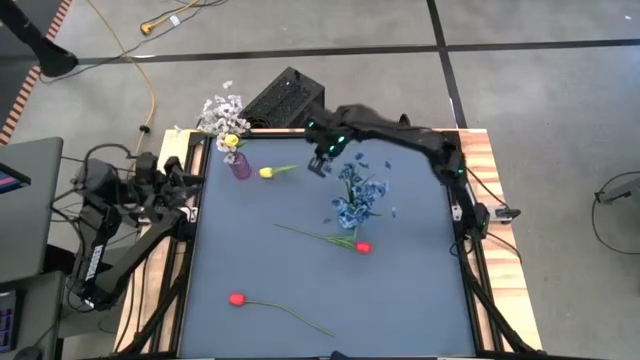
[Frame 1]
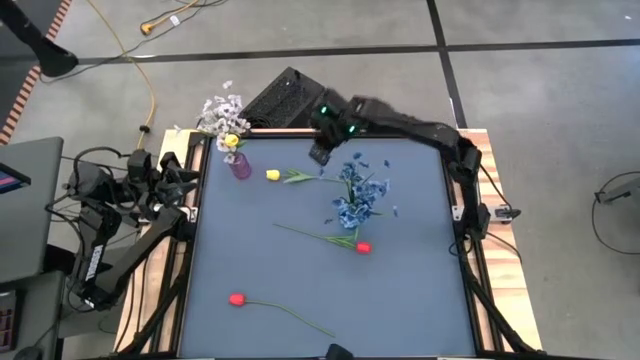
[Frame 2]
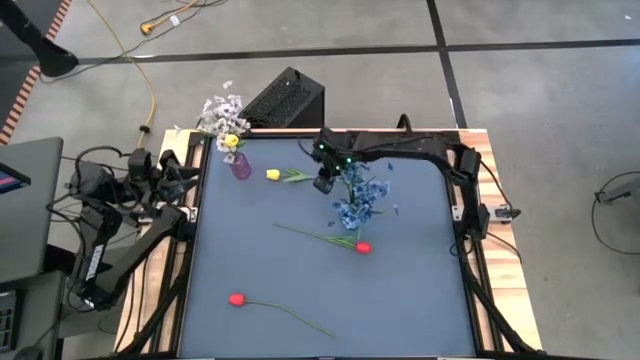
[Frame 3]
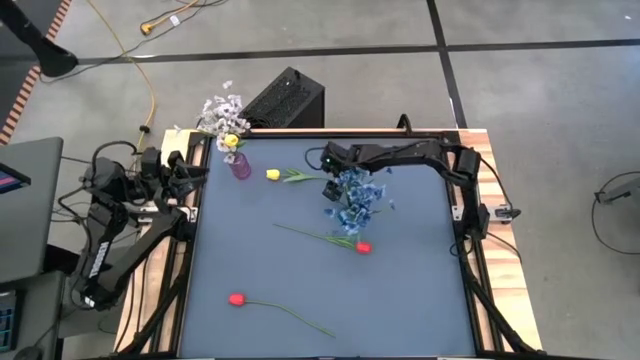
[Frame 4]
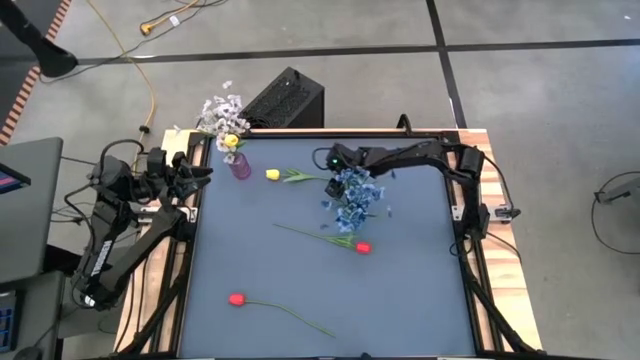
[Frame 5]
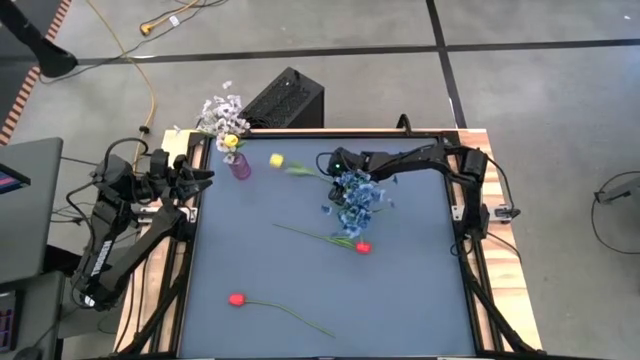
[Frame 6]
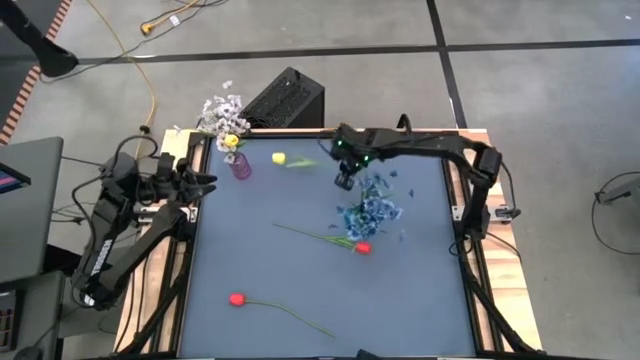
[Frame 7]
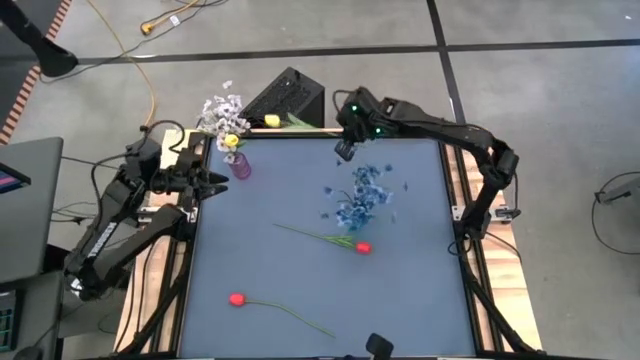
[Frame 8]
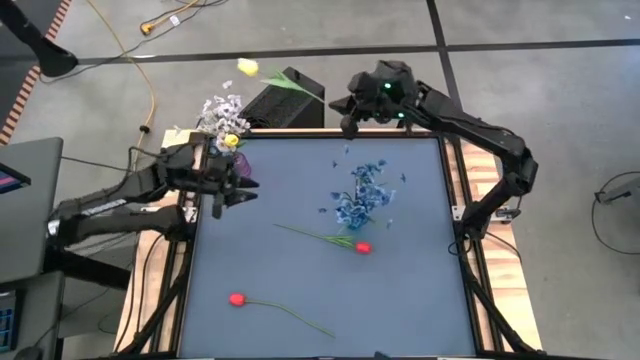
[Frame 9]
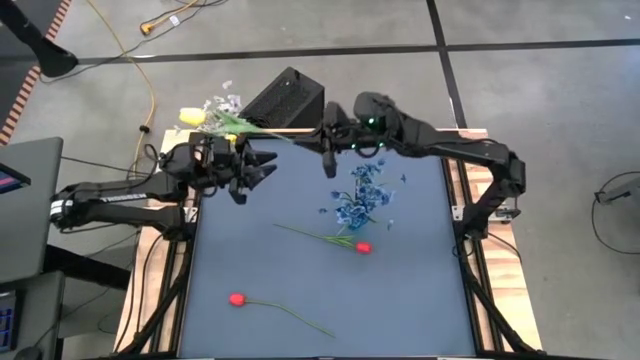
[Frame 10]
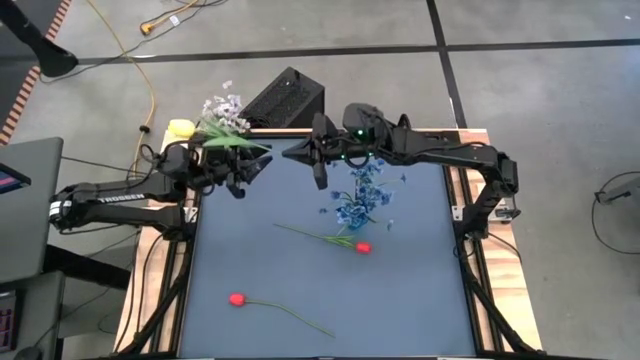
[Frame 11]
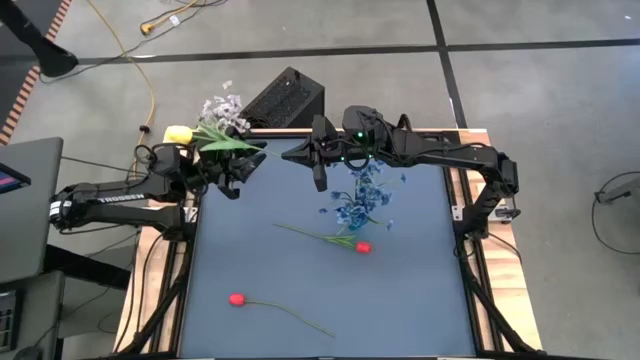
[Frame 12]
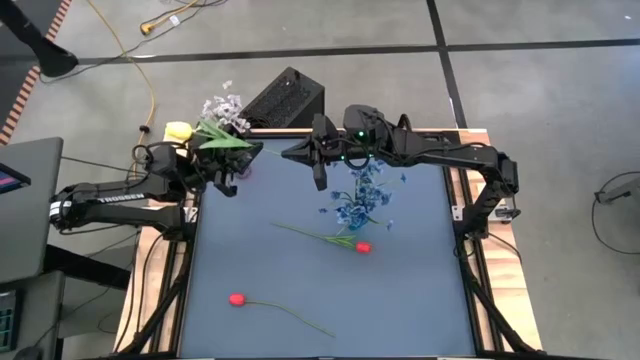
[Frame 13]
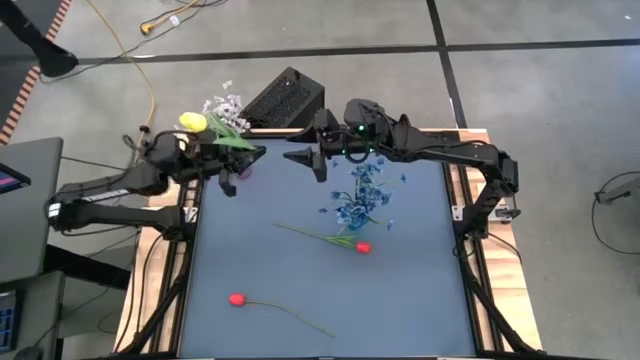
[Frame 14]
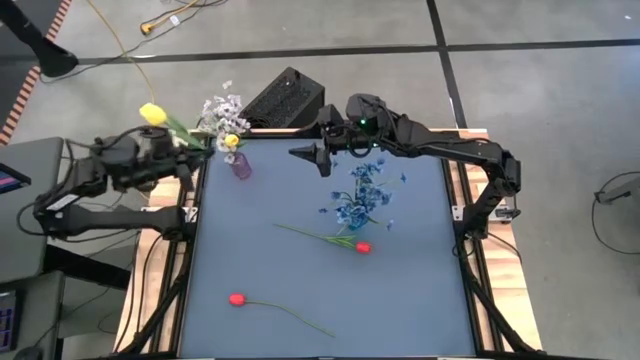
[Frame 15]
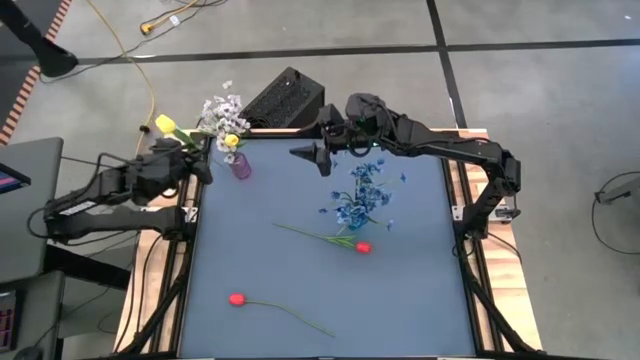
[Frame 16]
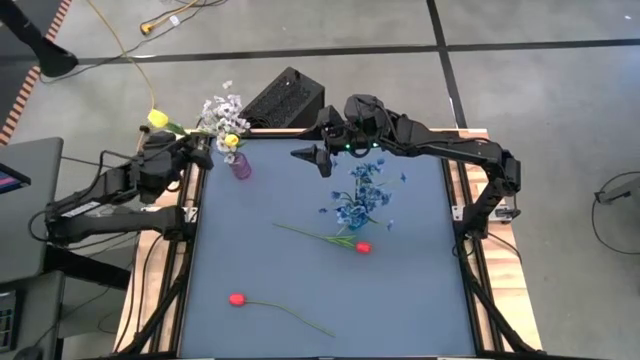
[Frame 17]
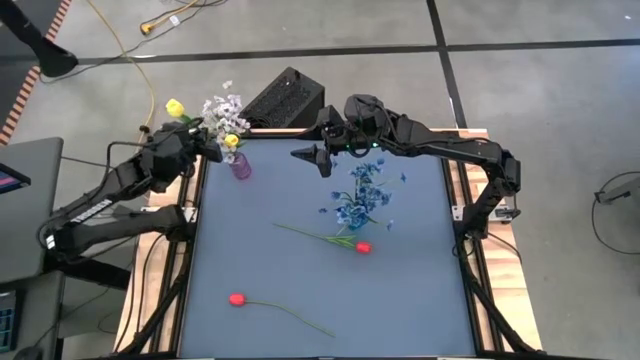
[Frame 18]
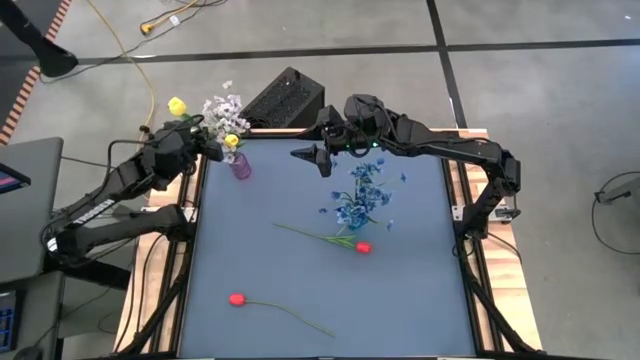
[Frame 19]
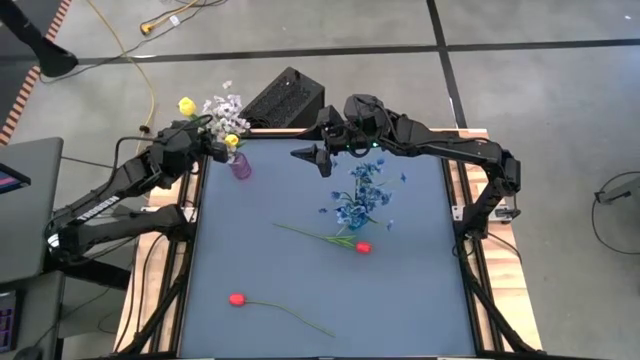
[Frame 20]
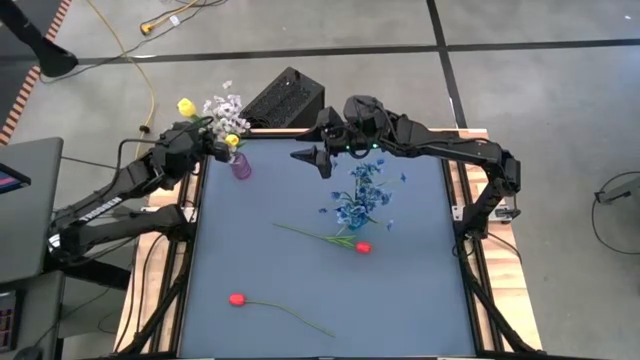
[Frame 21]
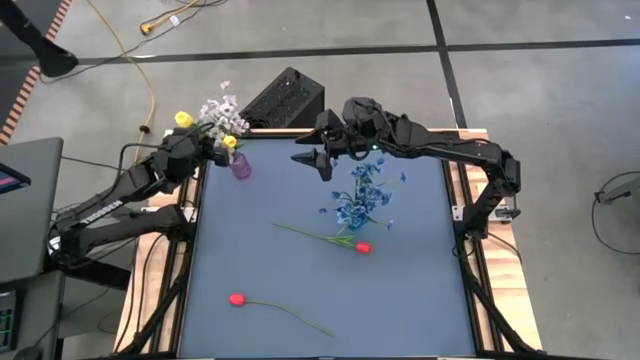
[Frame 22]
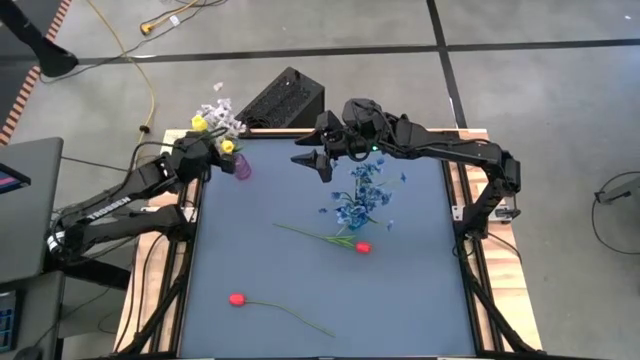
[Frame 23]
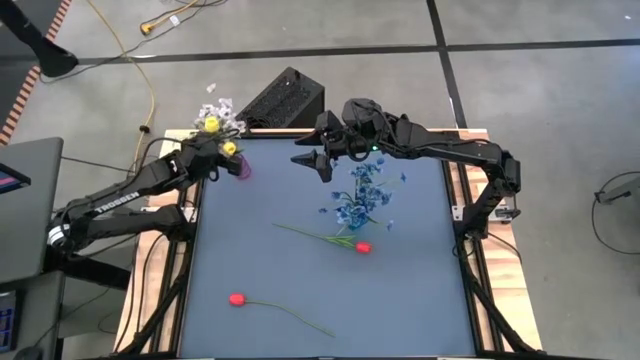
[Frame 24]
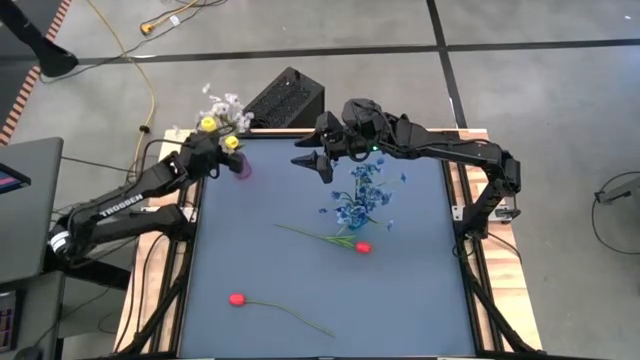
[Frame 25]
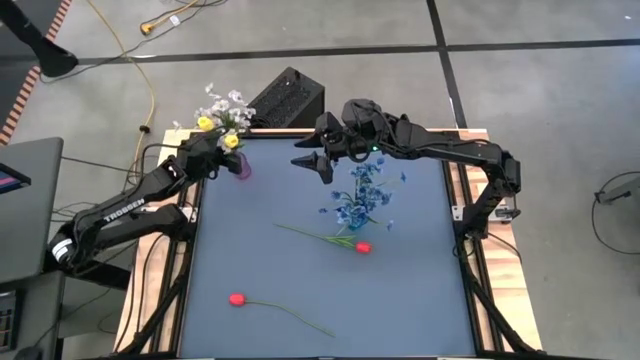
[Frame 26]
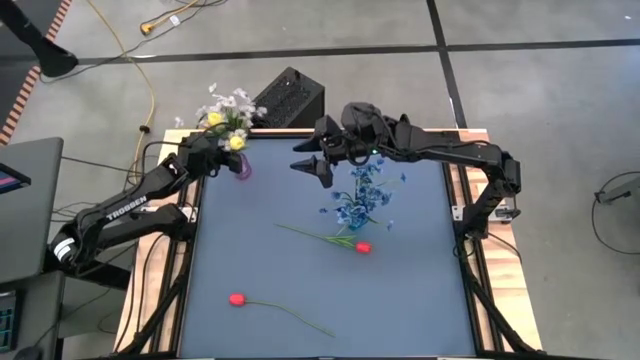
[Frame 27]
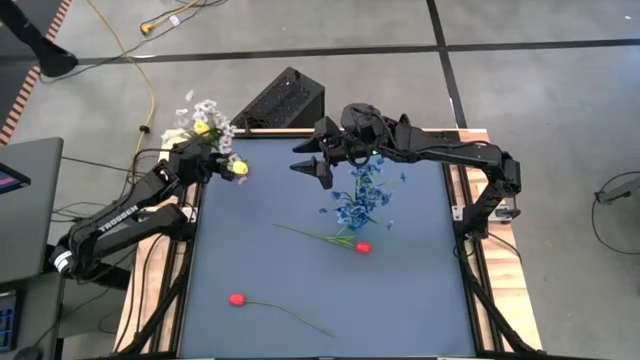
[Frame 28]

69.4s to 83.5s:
Task: Sort flowers into vase by color
Put the yellow flower into the purple vase

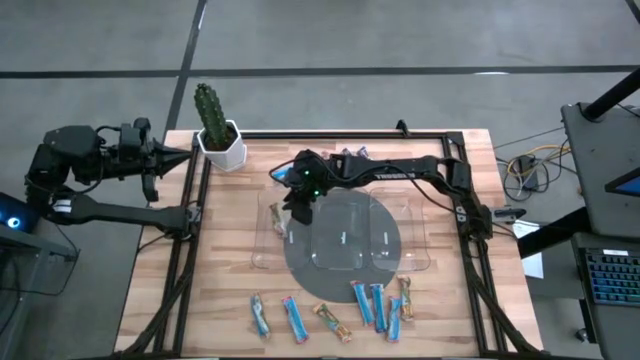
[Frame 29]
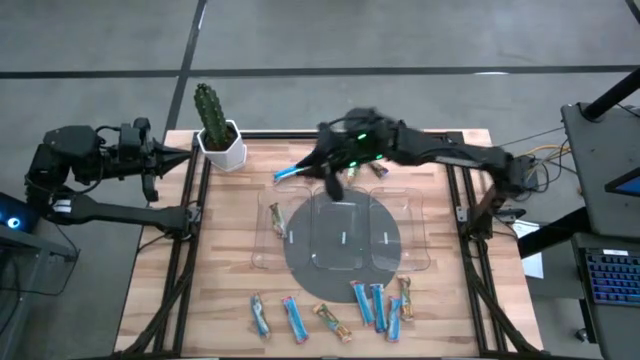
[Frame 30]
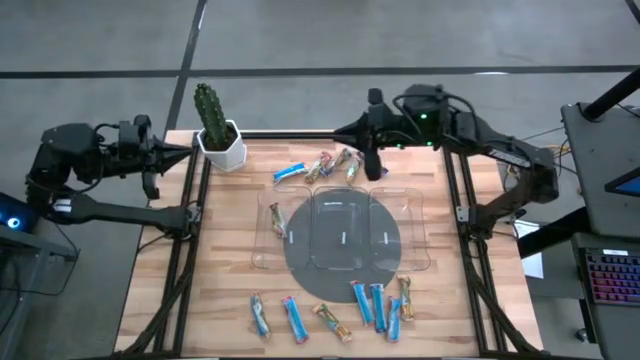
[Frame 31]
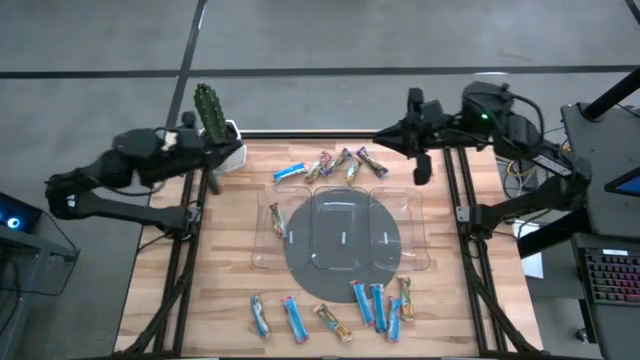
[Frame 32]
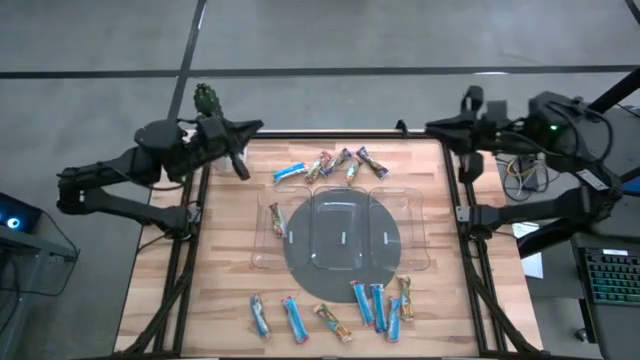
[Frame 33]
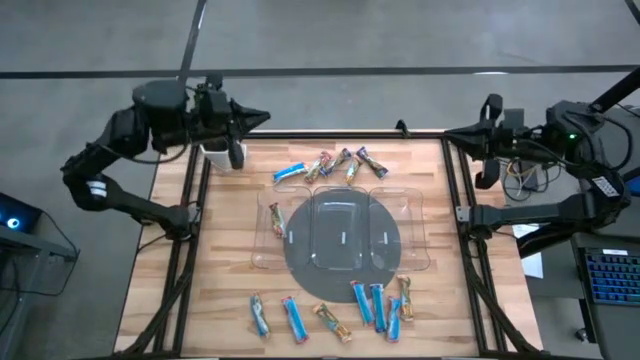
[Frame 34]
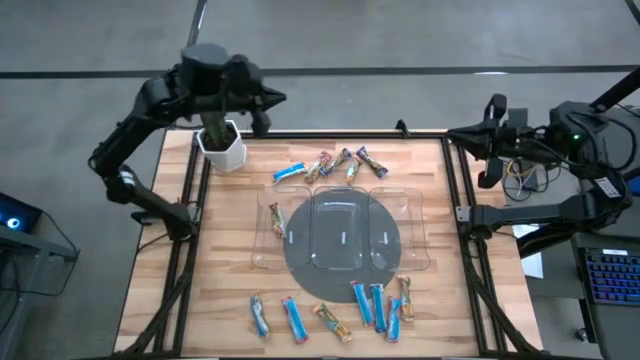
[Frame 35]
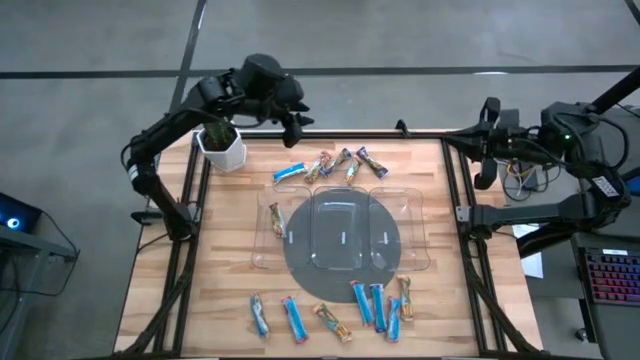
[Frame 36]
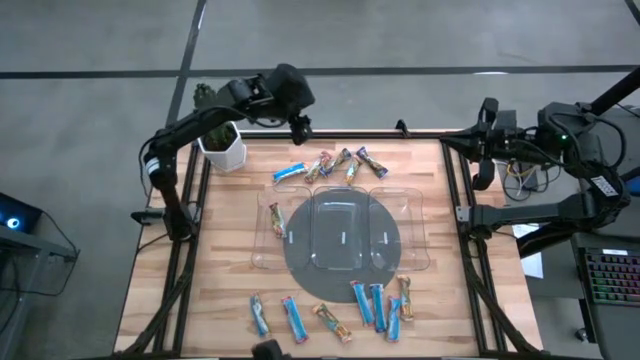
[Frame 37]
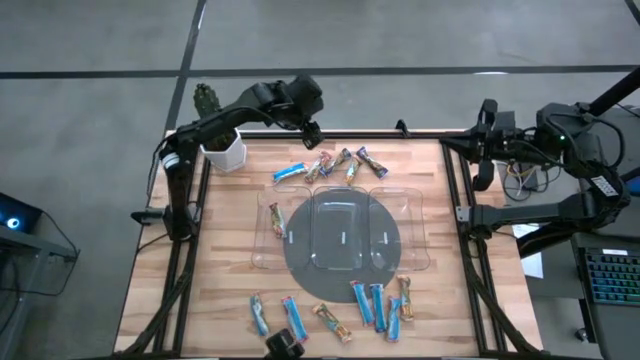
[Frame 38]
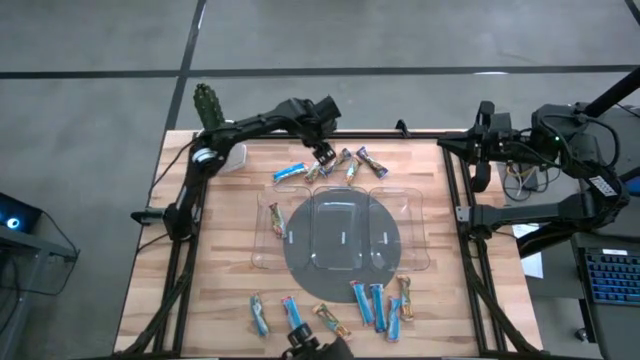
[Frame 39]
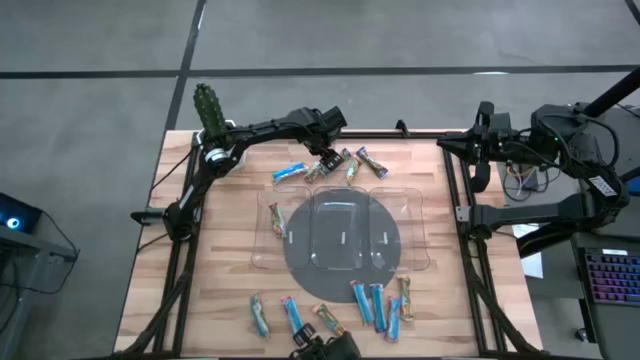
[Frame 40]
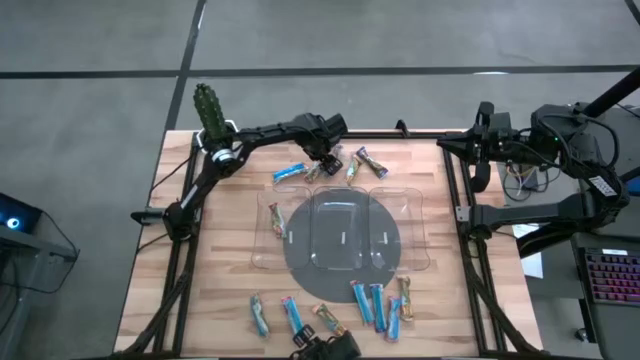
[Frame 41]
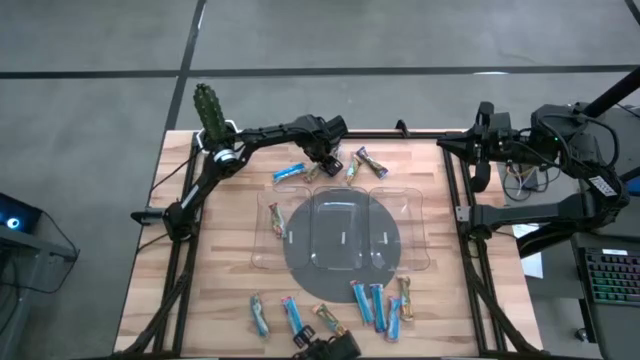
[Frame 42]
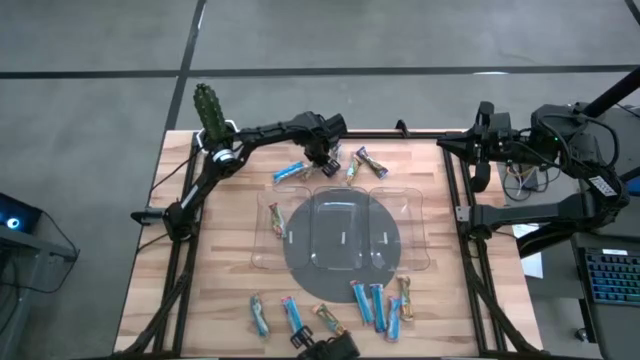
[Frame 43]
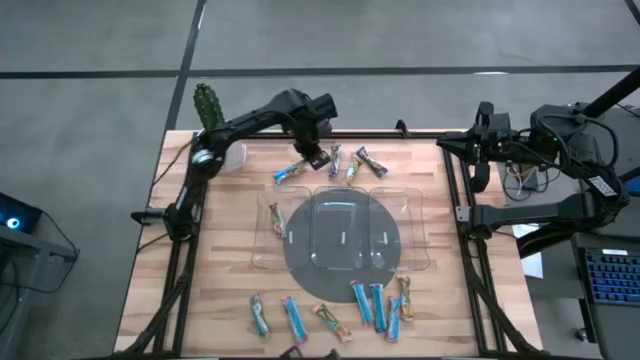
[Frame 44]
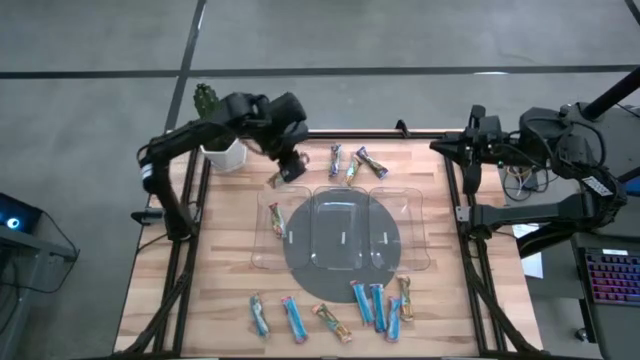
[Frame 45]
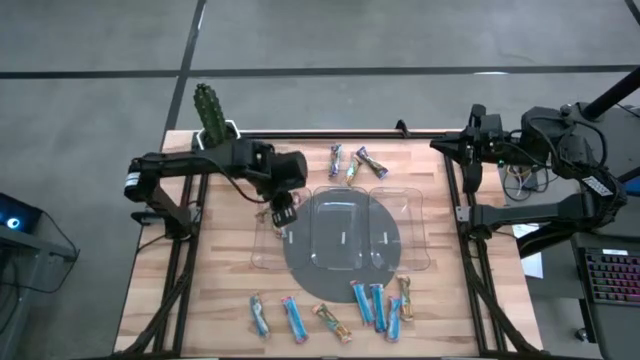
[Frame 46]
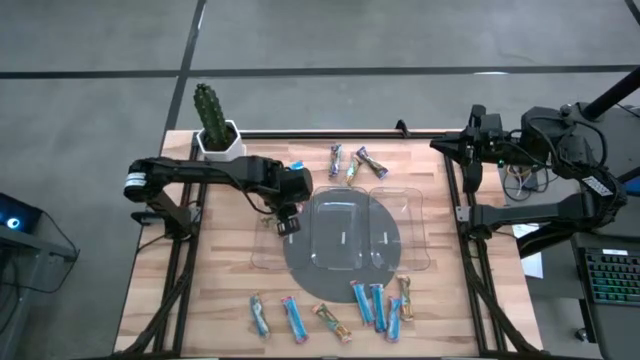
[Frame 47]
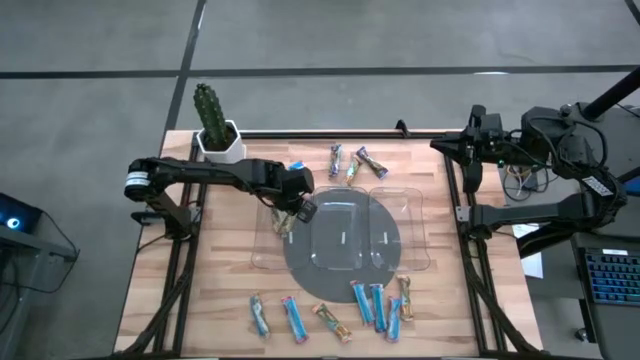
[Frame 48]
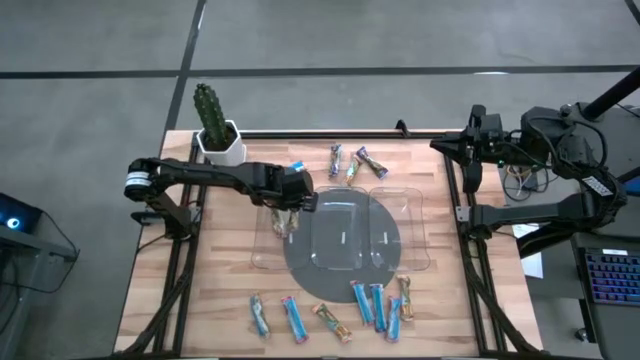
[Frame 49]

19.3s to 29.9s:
Task: Pick and place Granola Bars by type
Put the red granola bar into the left transparent bin
